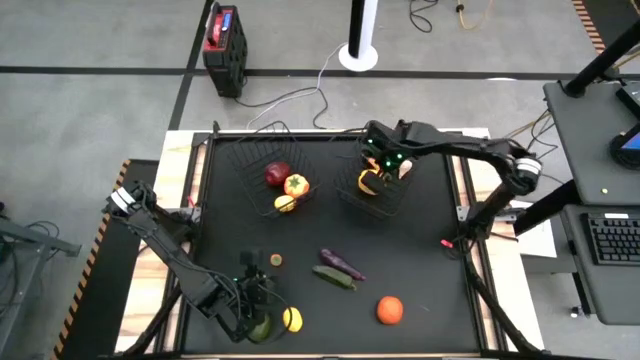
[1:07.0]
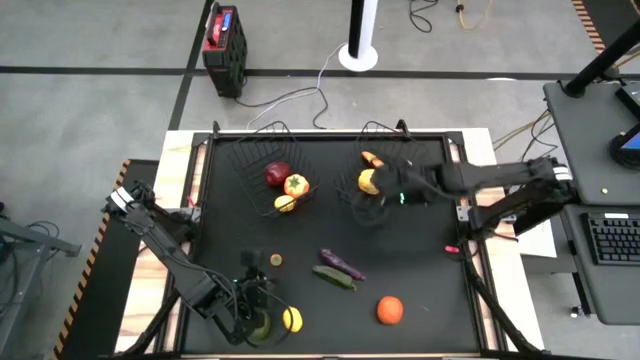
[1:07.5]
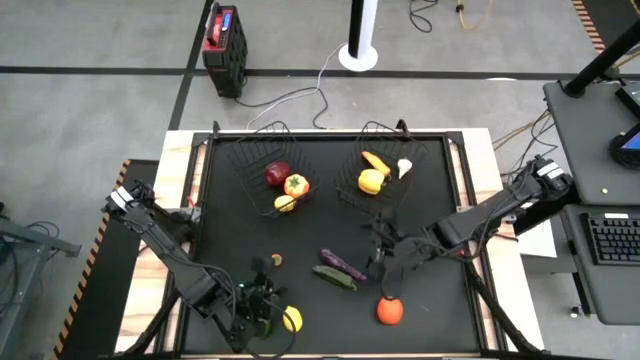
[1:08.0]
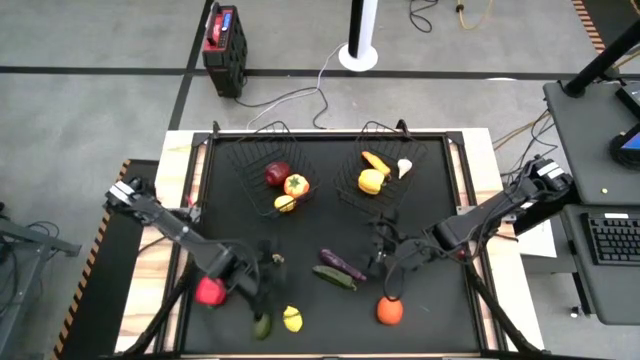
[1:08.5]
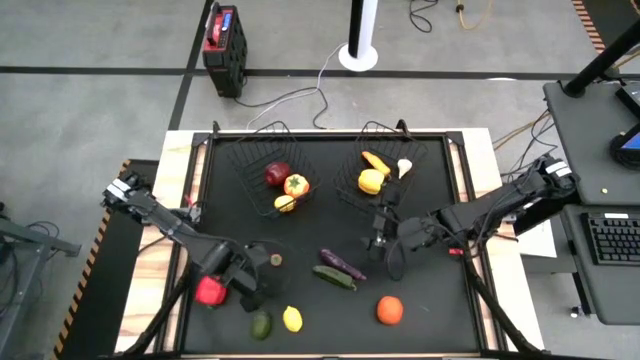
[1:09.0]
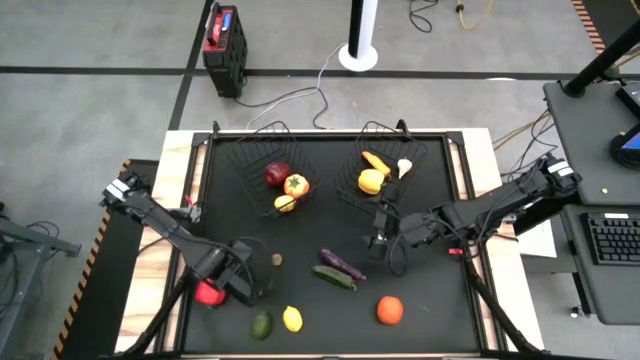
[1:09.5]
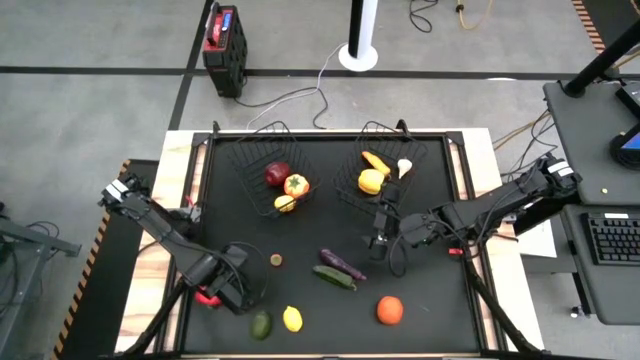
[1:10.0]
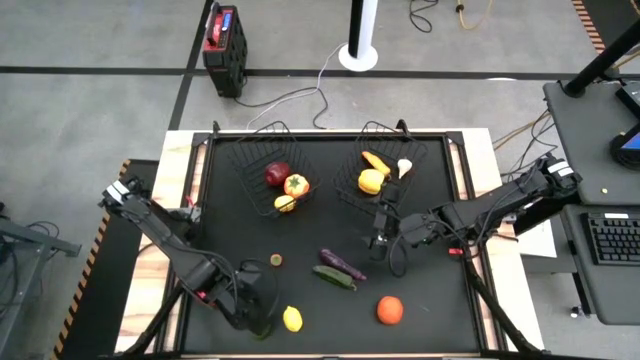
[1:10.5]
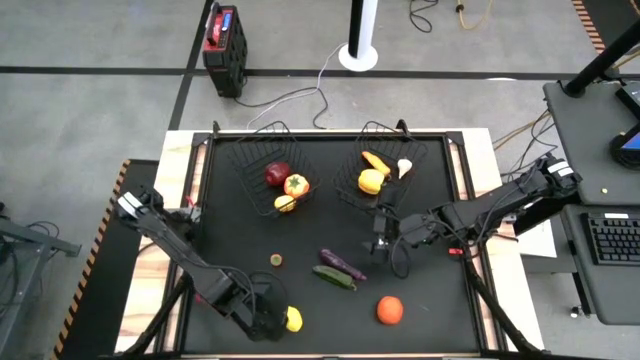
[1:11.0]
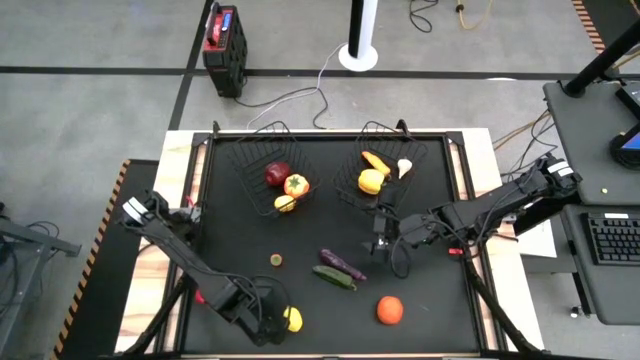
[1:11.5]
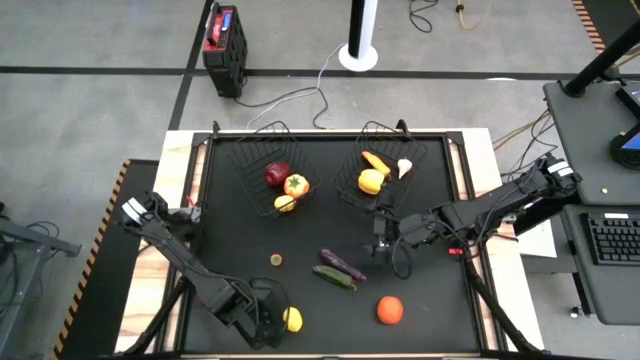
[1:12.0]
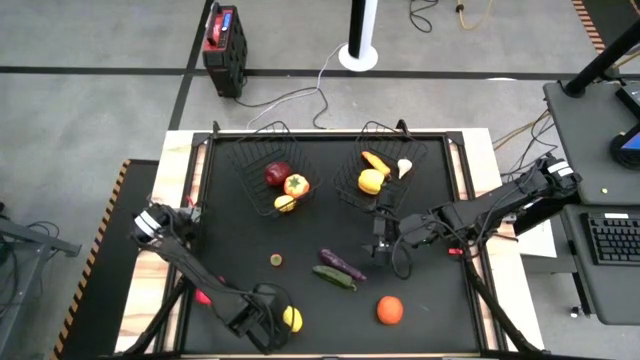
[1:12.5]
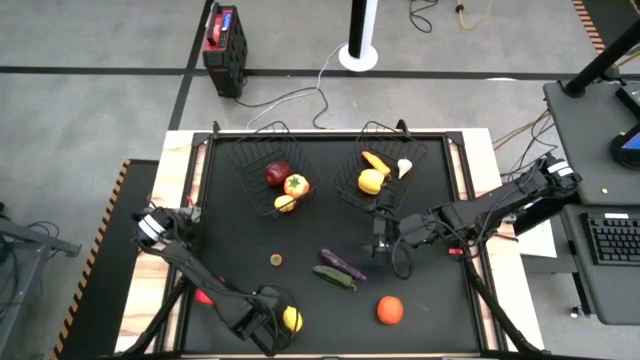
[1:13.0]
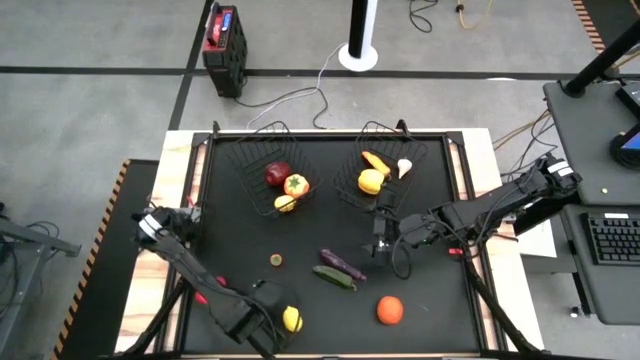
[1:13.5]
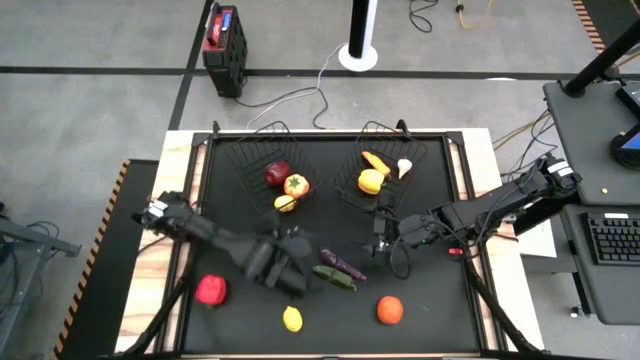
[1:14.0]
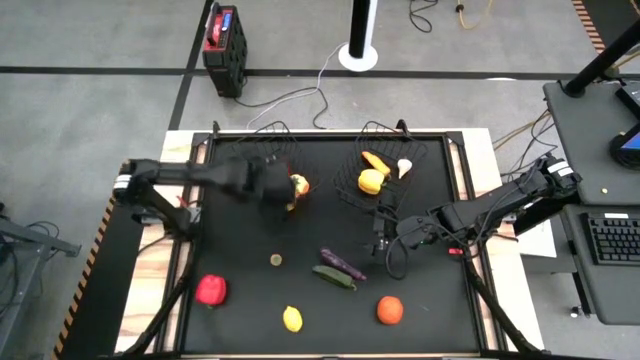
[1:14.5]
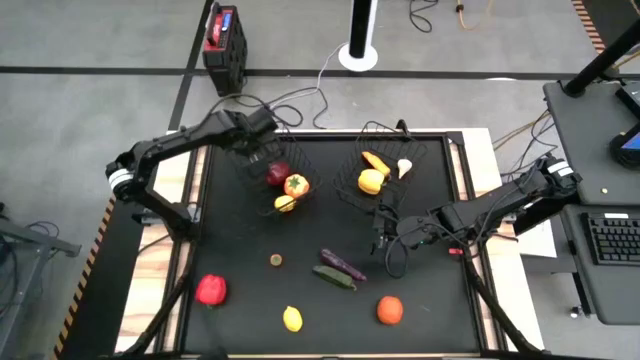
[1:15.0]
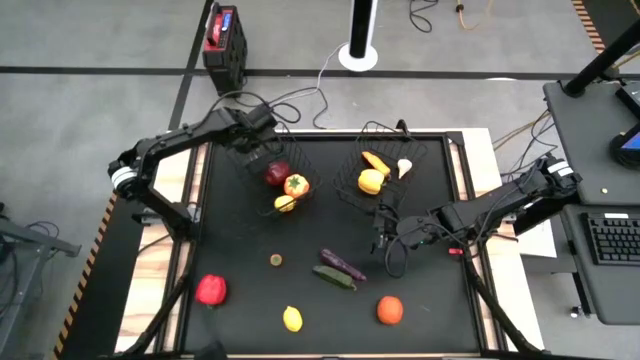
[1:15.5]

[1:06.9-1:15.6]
Task: Sort produce into baskets
Put the lime into the left black wire basket

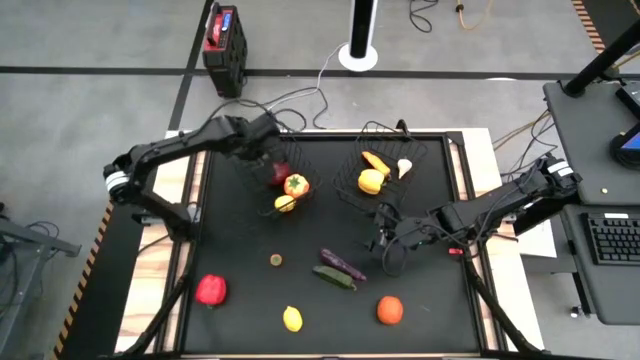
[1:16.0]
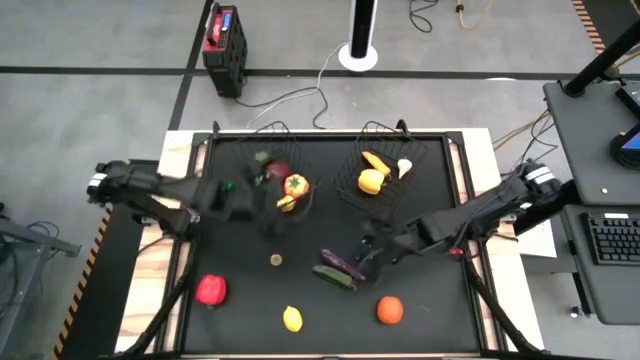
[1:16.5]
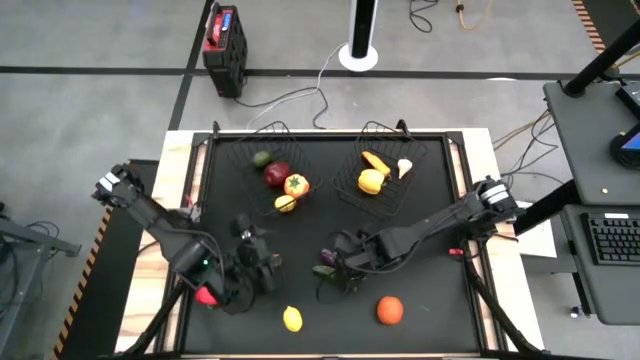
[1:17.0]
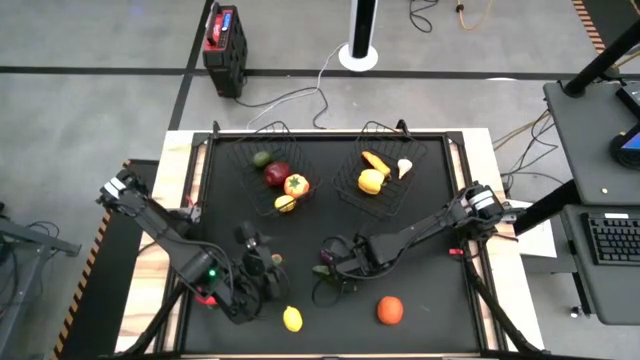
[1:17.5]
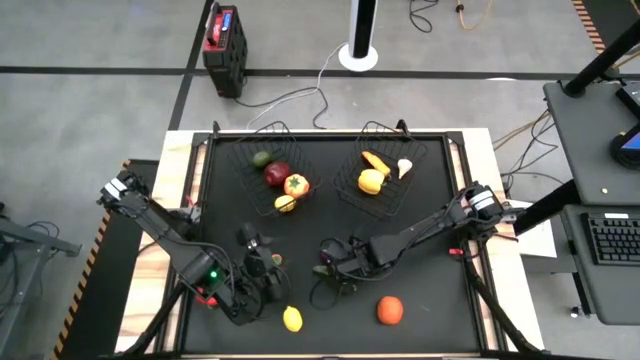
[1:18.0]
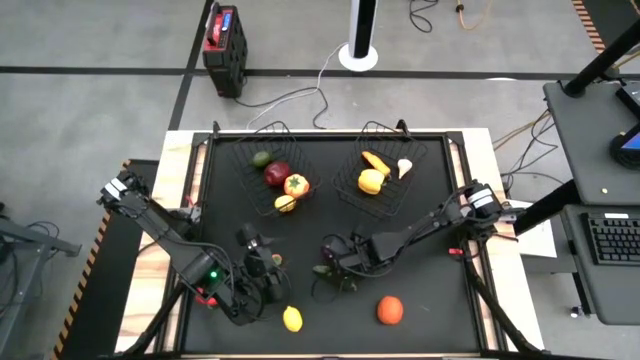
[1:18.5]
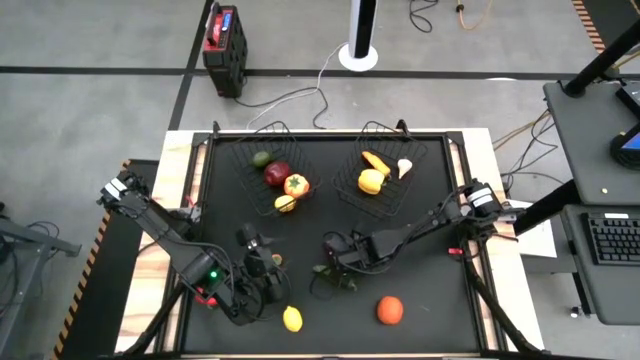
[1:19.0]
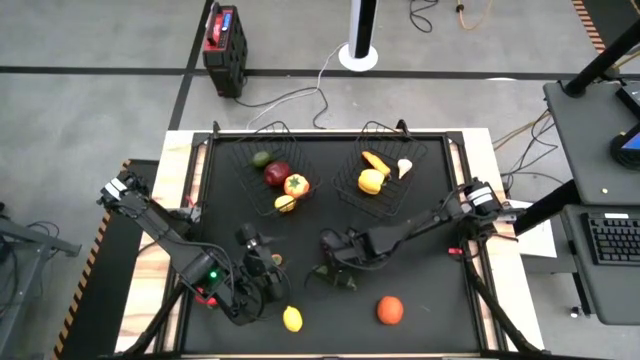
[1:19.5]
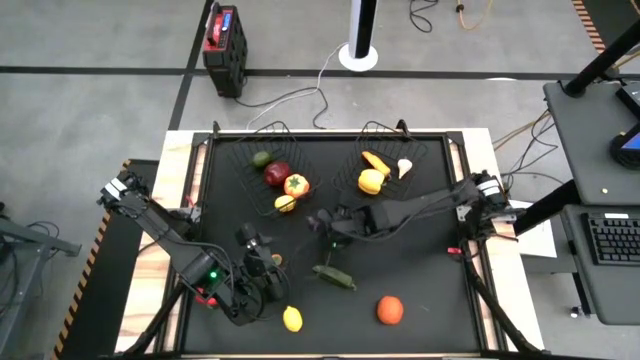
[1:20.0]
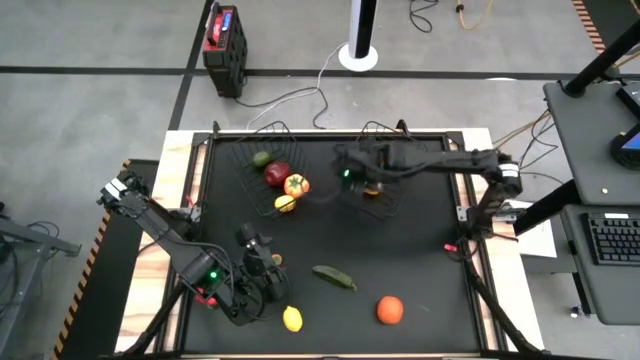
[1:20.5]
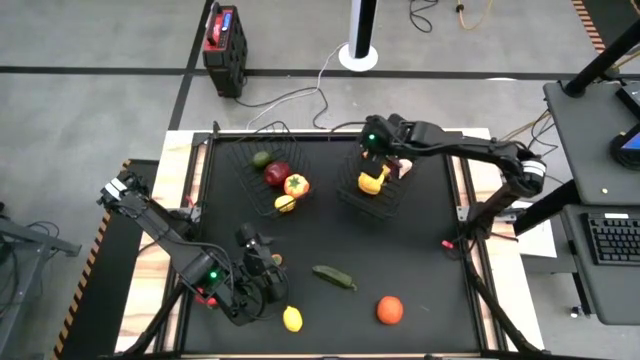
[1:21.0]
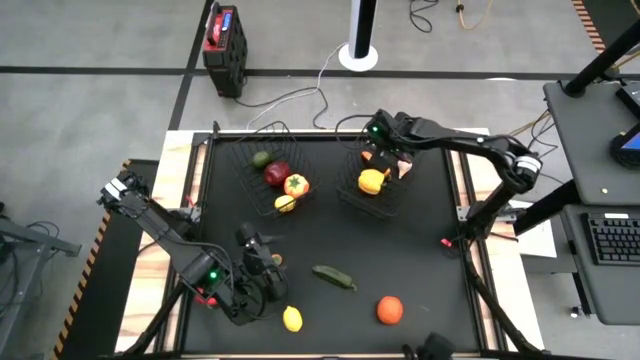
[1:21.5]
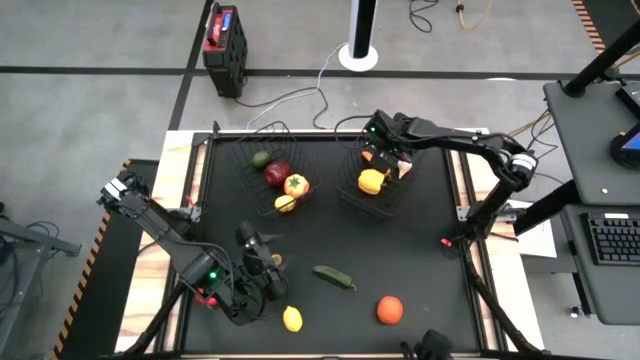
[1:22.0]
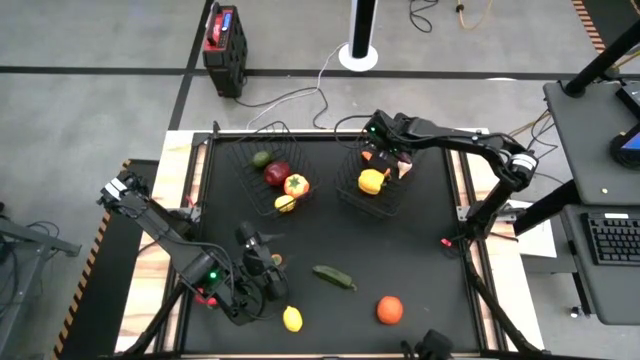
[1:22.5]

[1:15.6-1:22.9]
Put the eggplant into the right black wire basket

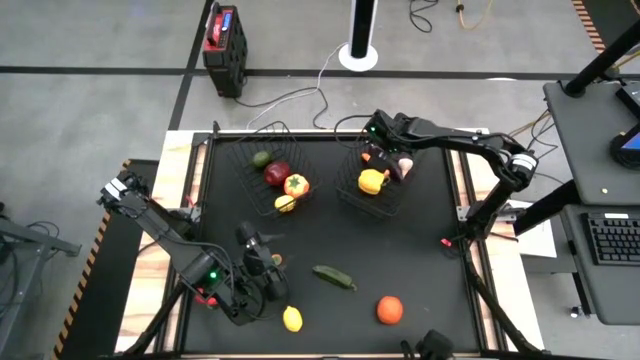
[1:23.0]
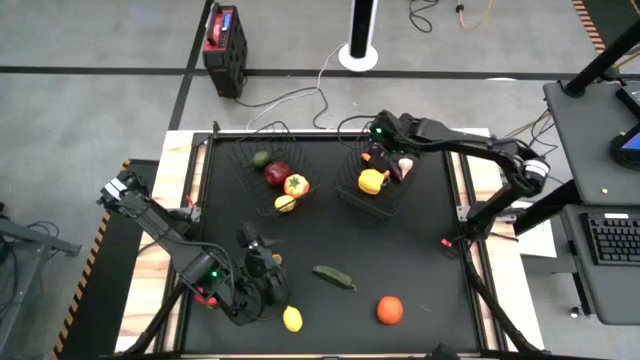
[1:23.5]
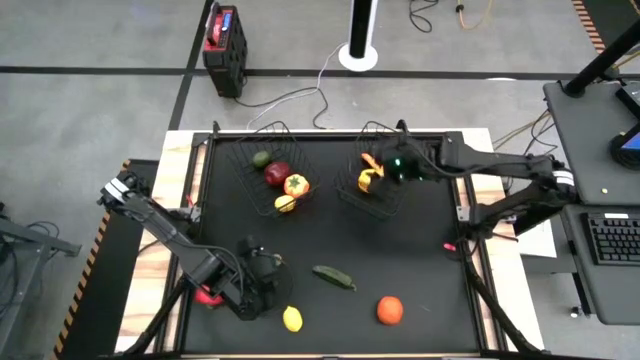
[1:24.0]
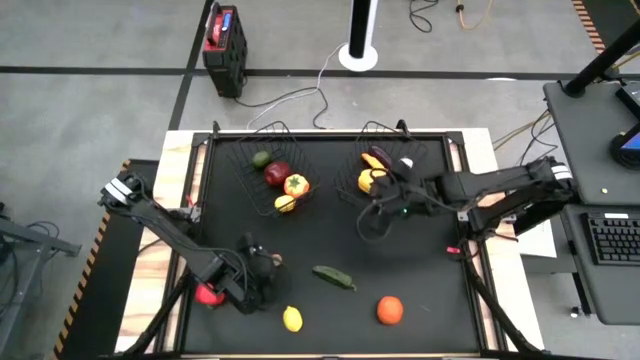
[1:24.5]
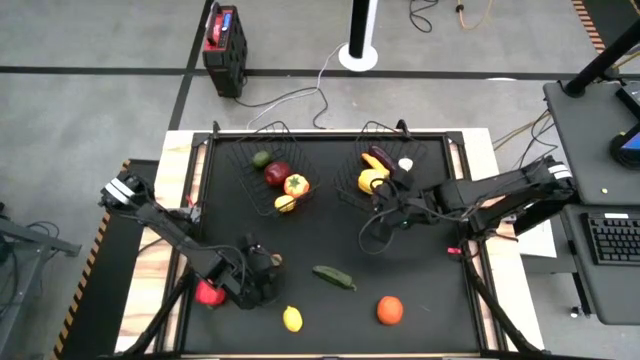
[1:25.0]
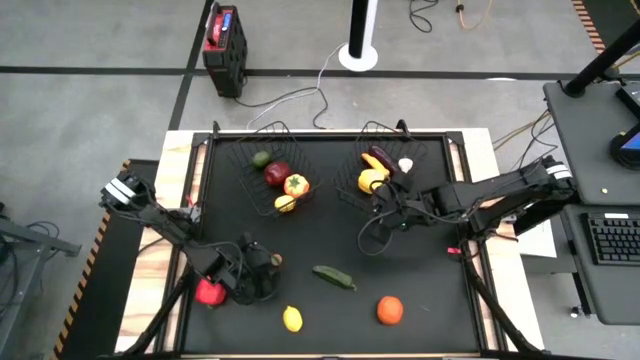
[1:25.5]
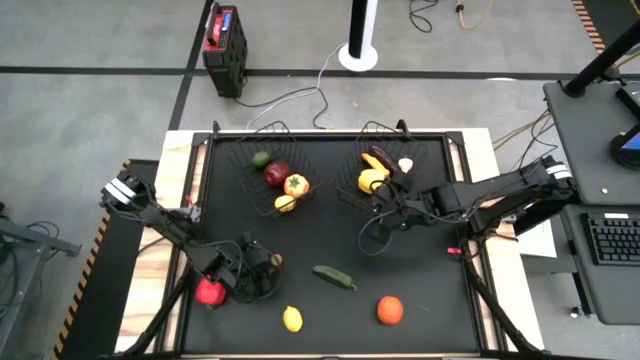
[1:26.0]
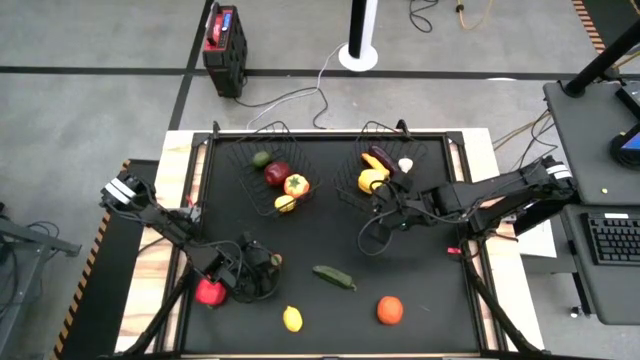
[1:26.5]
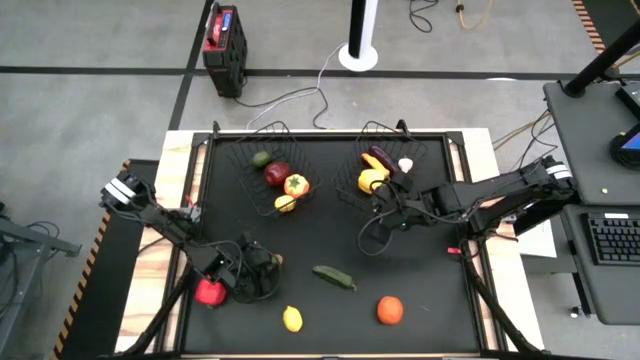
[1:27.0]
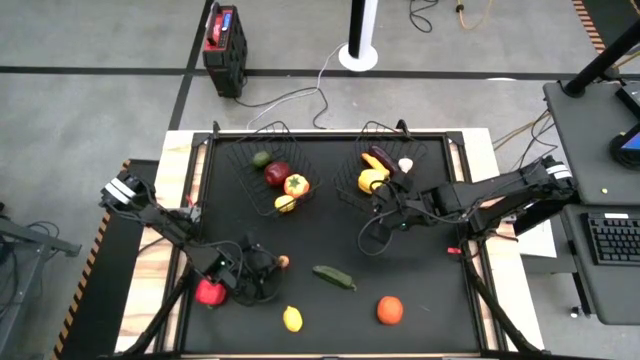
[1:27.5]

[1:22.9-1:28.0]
Put the persimmon into the left black wire basket
